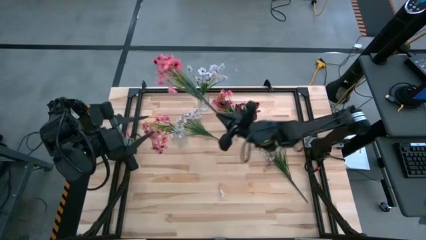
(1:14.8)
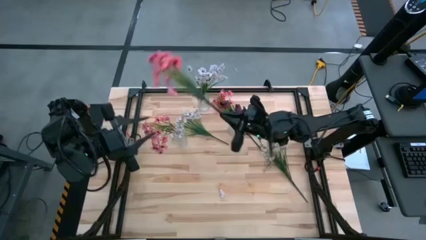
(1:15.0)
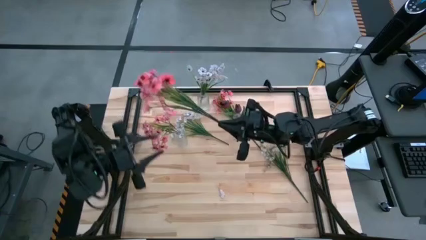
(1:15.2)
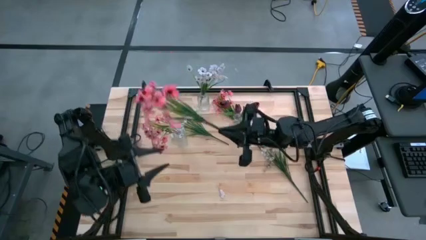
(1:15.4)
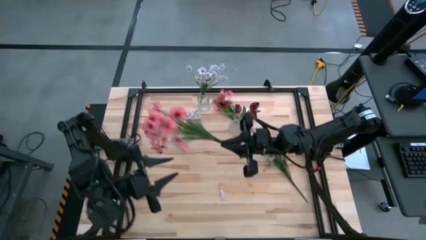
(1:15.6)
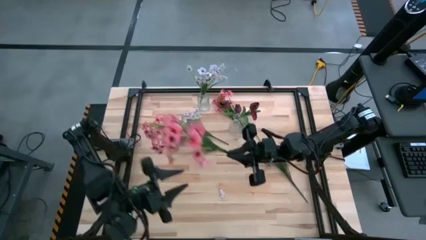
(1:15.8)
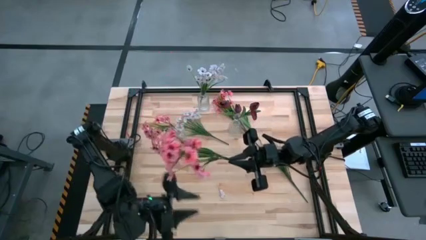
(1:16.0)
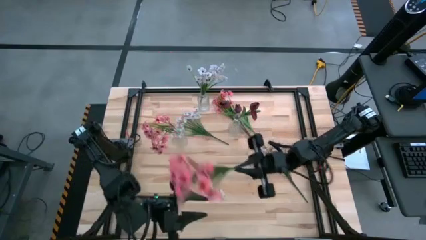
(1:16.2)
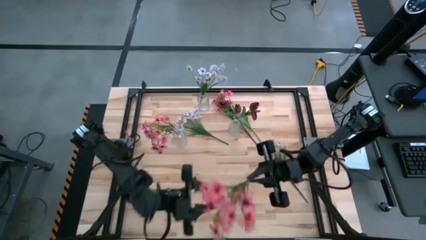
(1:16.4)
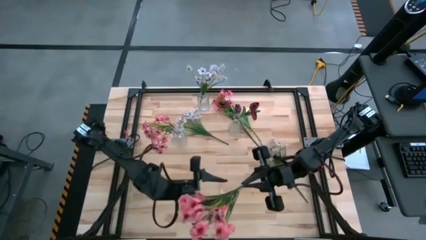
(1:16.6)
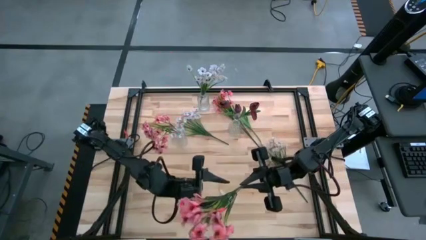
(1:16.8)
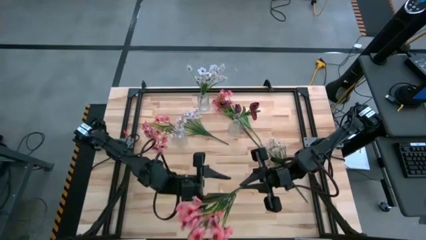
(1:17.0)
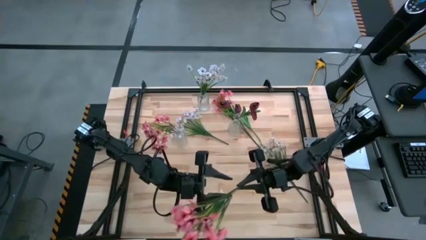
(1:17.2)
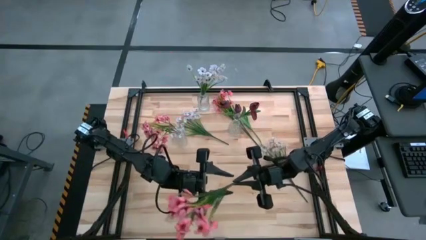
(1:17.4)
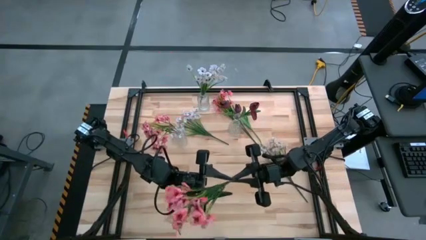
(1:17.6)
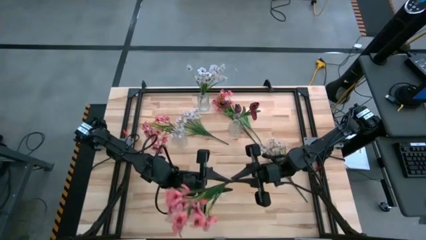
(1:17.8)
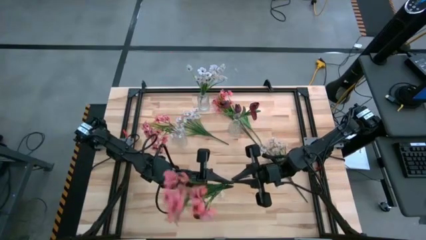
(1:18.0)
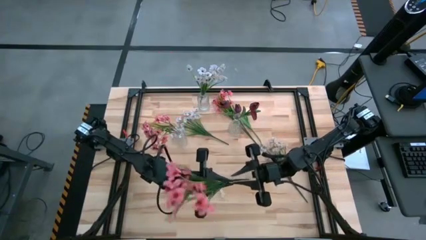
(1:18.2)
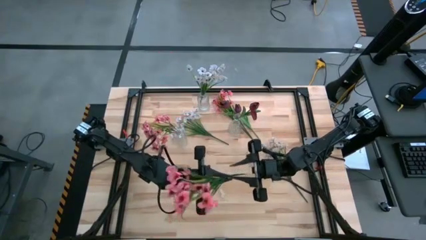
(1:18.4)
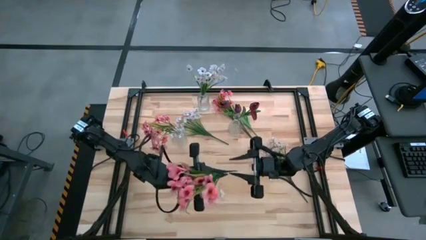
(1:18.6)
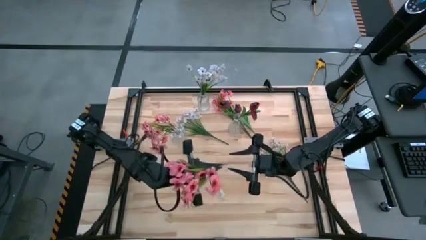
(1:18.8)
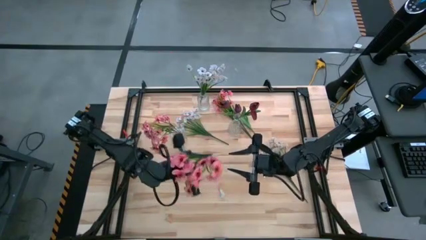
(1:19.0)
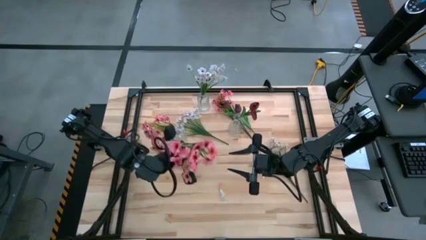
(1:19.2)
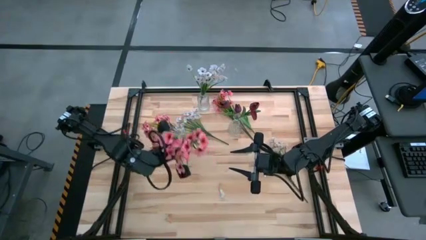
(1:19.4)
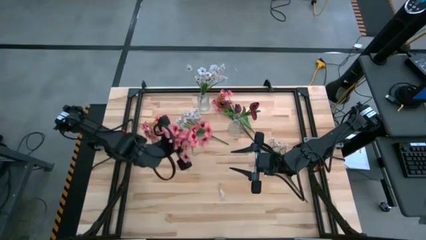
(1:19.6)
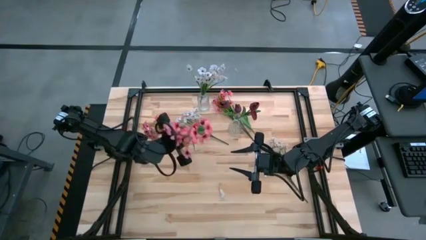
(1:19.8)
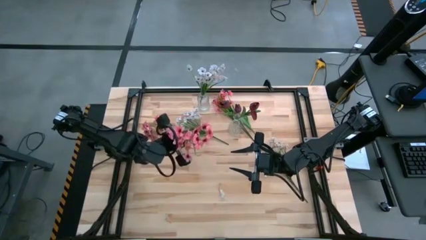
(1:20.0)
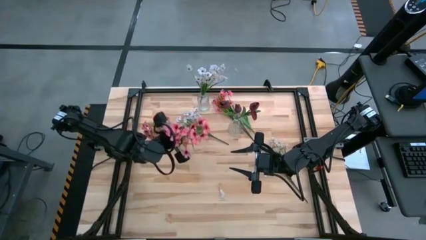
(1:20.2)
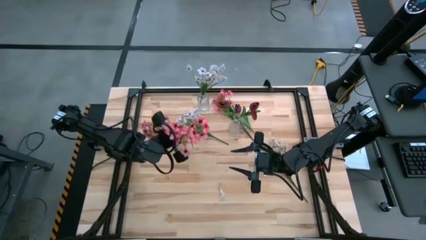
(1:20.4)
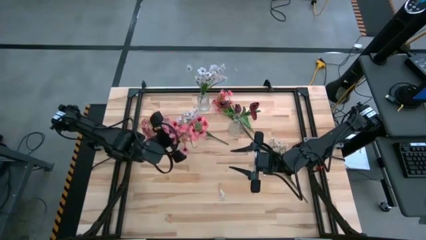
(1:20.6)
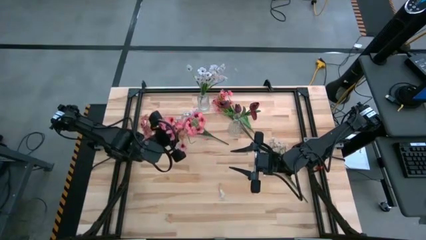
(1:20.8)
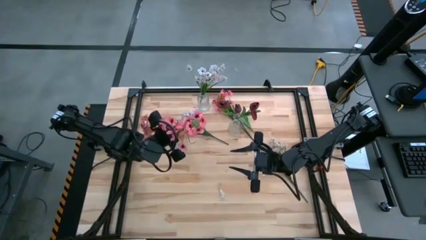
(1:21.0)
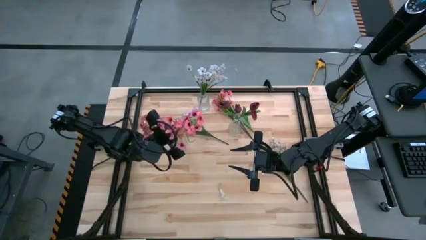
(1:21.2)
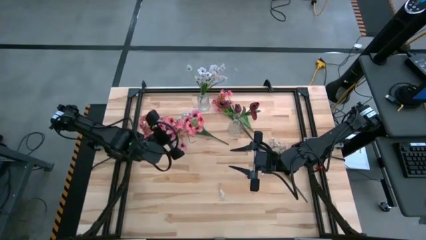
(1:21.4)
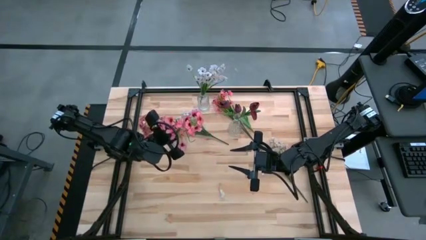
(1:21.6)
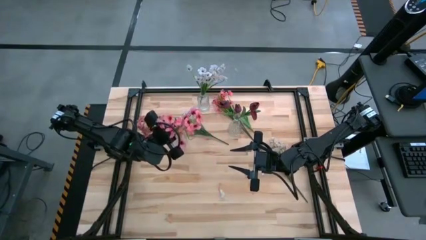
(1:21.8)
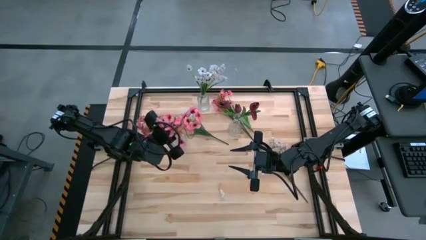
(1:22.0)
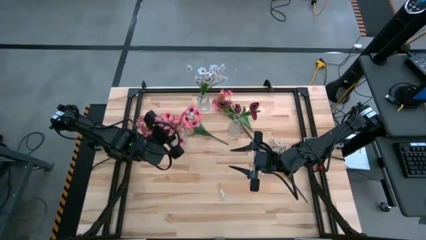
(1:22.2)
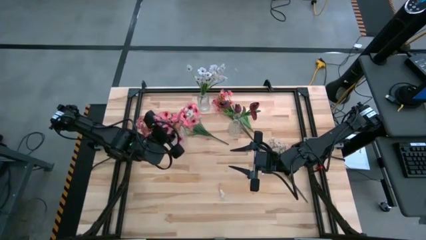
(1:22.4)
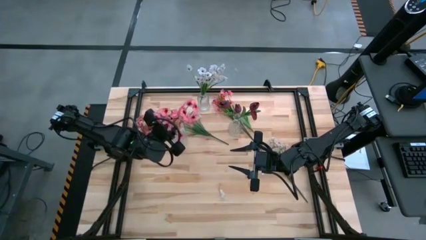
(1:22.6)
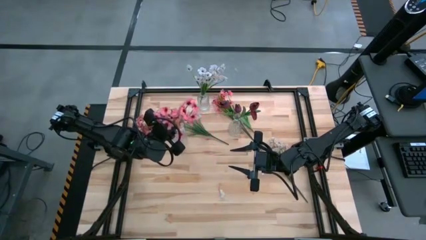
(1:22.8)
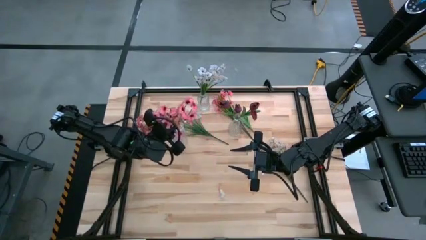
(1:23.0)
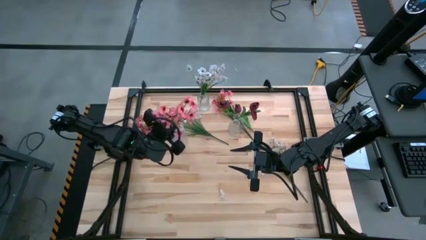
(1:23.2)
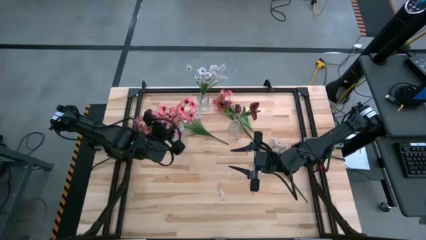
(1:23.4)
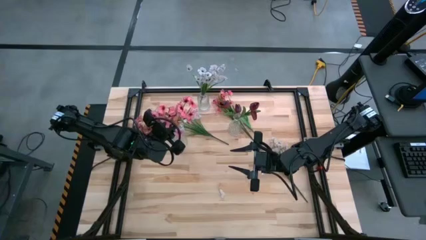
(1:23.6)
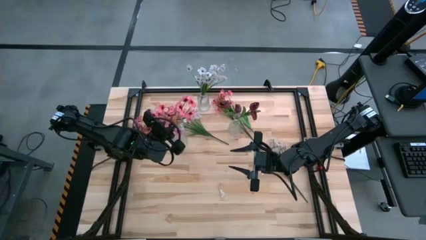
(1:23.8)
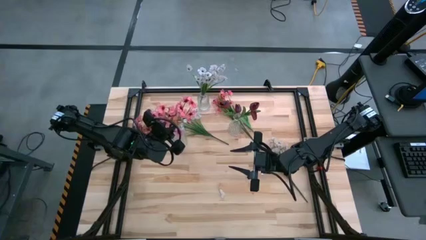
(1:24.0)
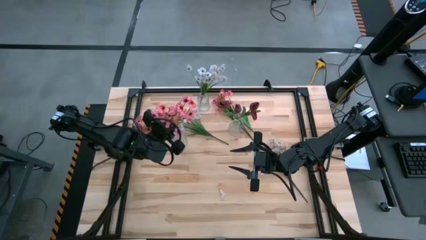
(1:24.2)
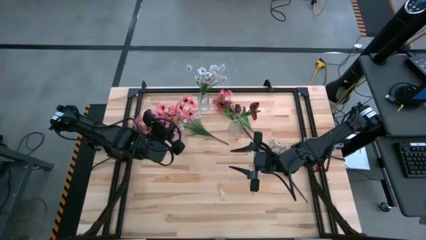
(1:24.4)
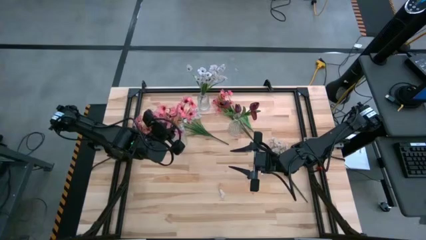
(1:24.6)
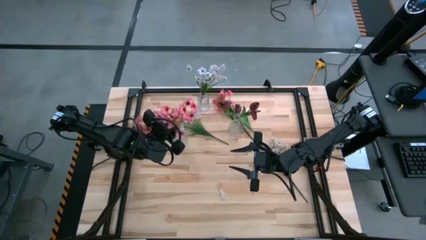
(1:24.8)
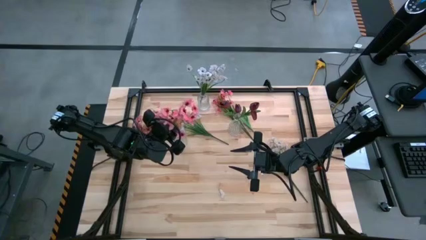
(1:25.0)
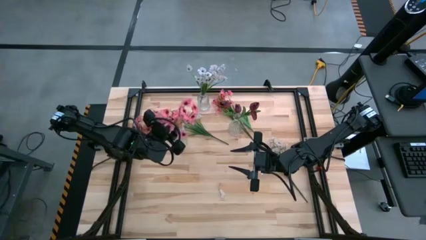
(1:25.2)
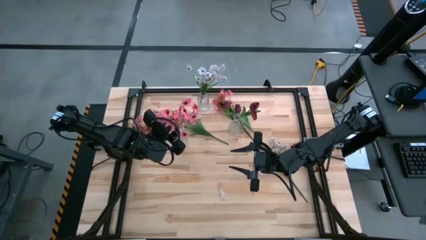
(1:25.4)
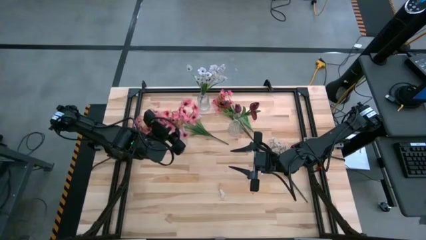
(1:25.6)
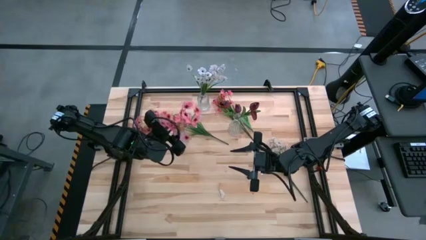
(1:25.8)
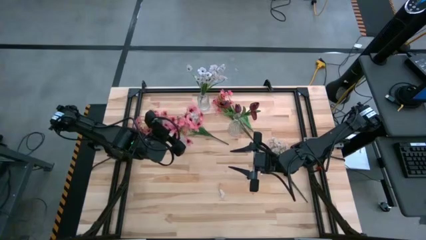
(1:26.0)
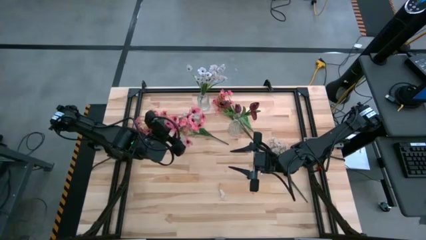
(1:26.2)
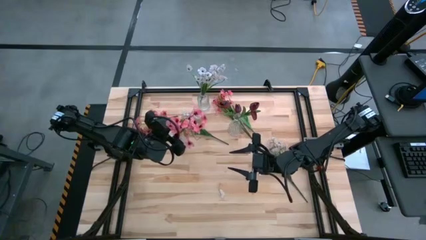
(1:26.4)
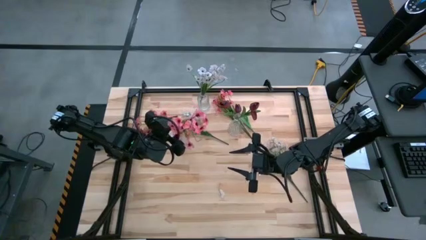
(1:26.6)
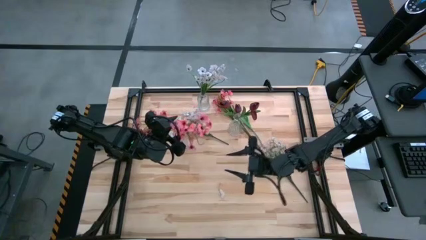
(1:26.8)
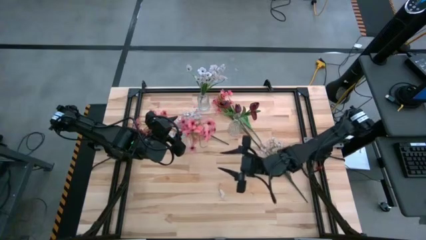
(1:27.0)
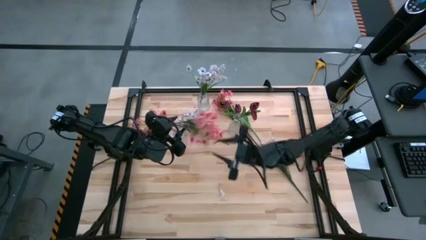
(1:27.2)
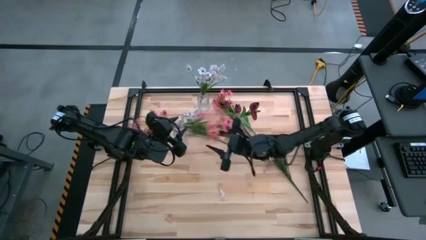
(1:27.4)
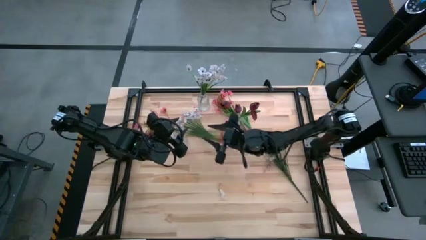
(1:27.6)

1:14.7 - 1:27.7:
Task: Sort flowers into vase by color
Put the left pink flower into the bottom left transparent vase
